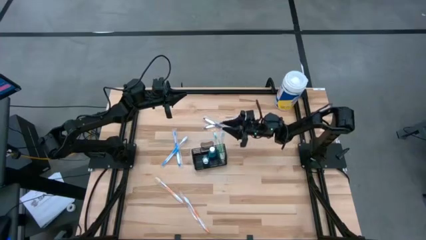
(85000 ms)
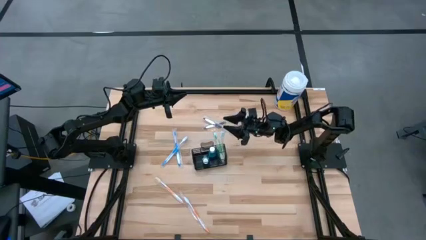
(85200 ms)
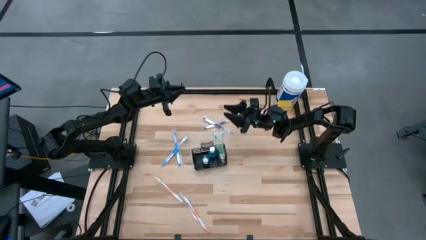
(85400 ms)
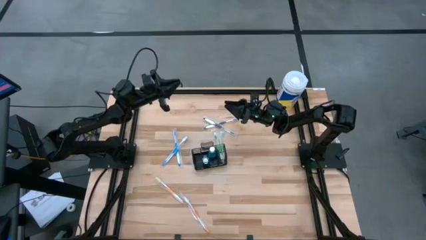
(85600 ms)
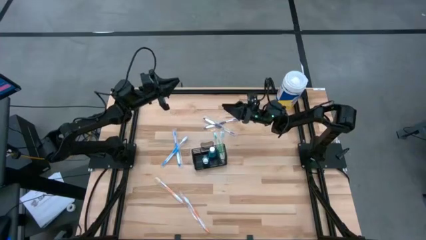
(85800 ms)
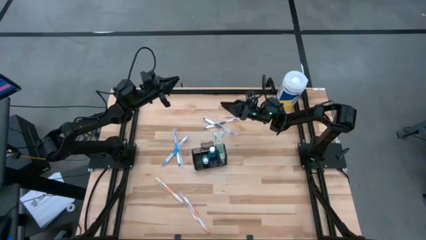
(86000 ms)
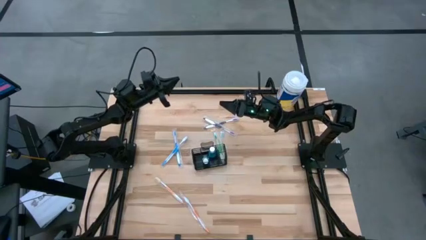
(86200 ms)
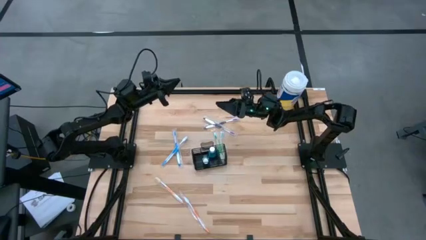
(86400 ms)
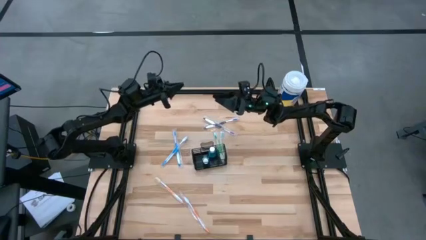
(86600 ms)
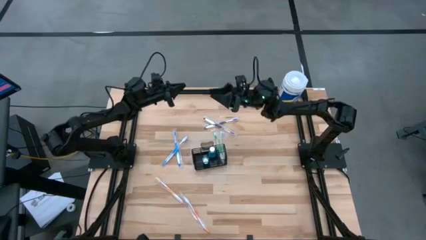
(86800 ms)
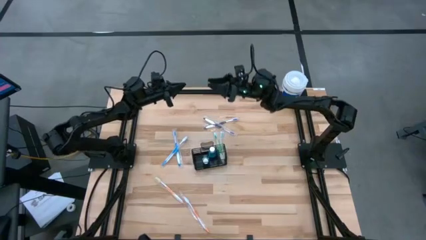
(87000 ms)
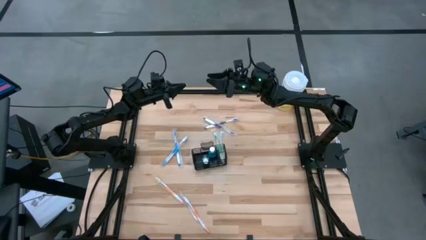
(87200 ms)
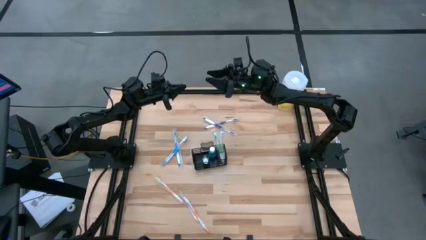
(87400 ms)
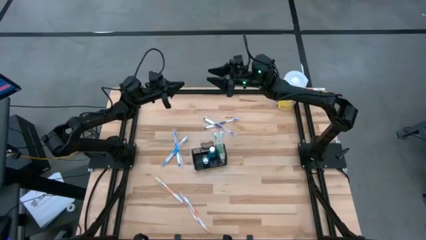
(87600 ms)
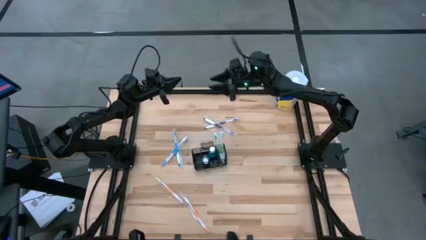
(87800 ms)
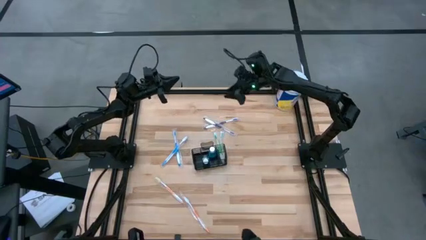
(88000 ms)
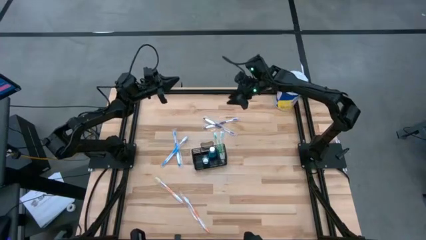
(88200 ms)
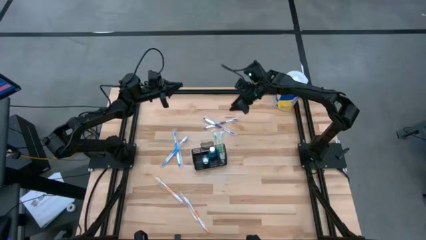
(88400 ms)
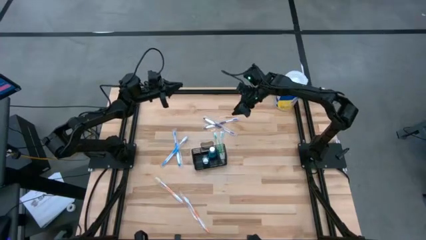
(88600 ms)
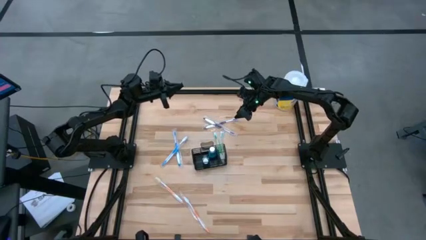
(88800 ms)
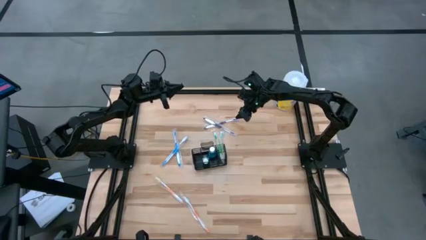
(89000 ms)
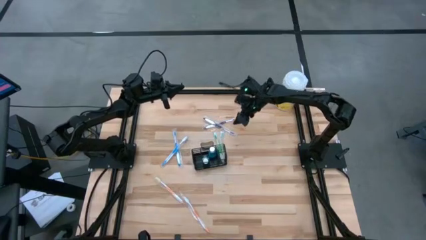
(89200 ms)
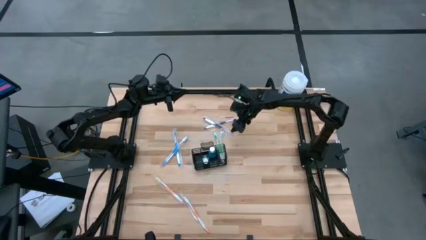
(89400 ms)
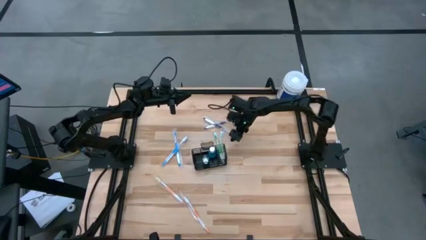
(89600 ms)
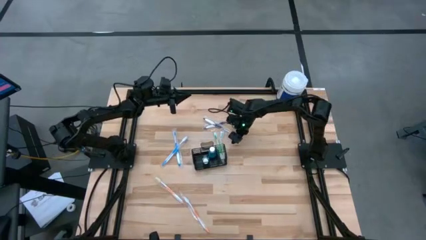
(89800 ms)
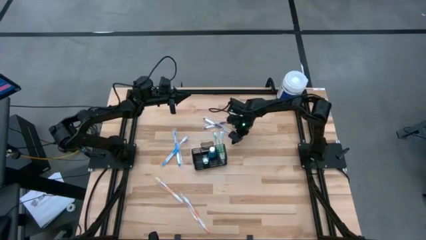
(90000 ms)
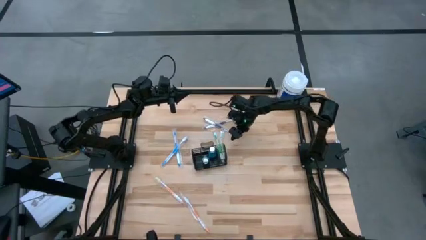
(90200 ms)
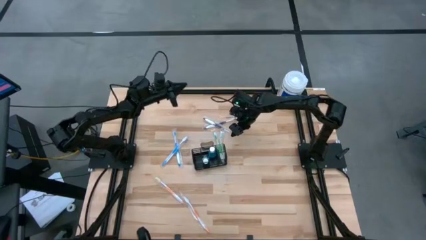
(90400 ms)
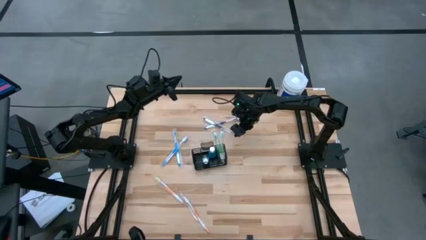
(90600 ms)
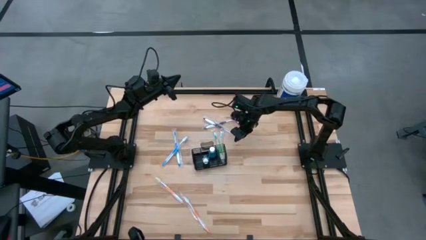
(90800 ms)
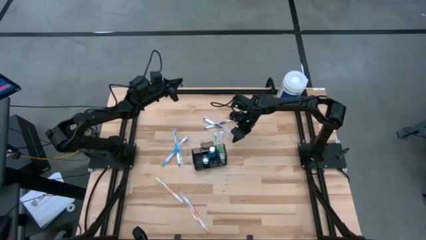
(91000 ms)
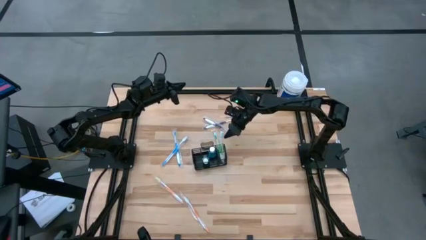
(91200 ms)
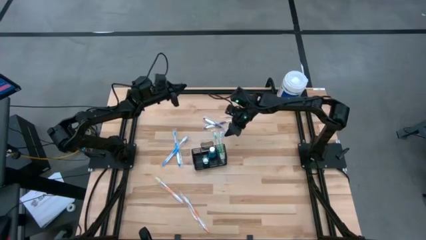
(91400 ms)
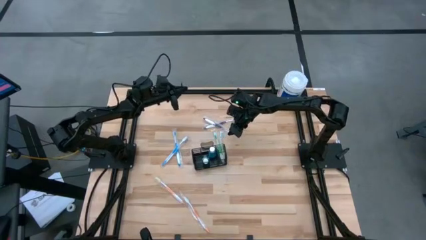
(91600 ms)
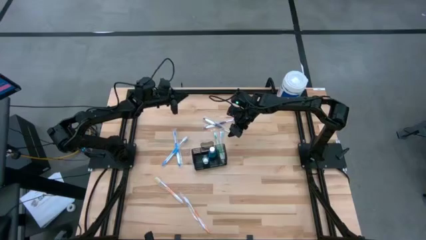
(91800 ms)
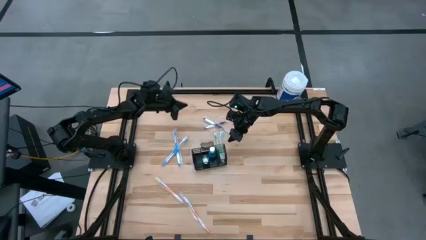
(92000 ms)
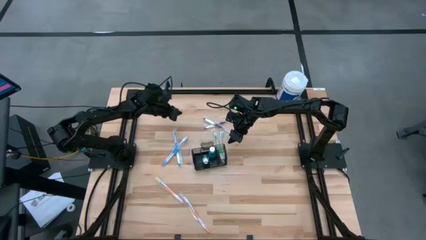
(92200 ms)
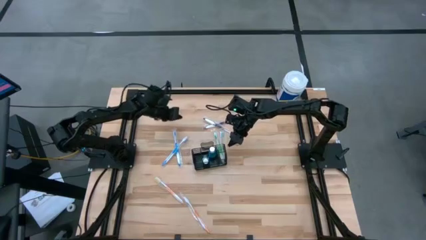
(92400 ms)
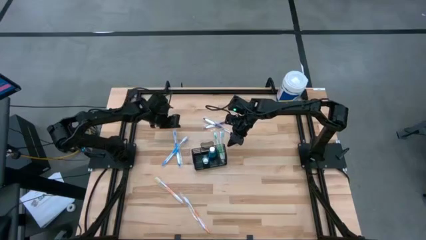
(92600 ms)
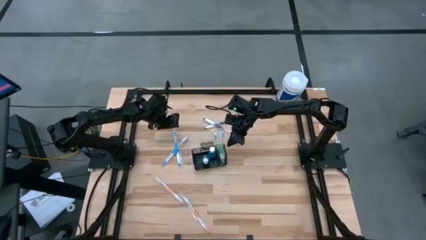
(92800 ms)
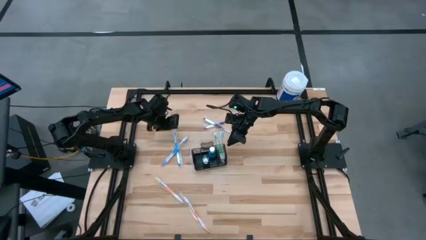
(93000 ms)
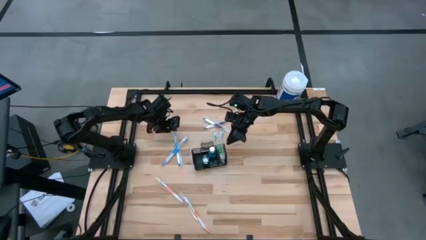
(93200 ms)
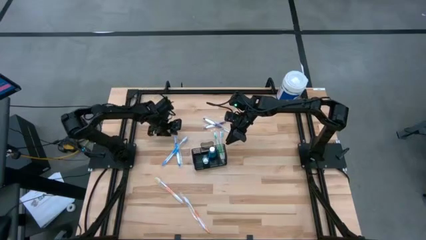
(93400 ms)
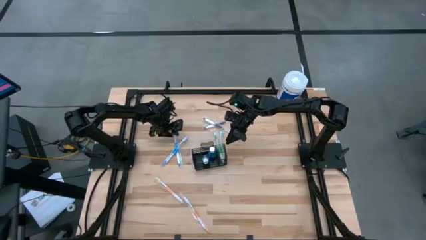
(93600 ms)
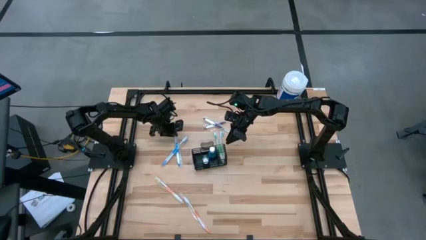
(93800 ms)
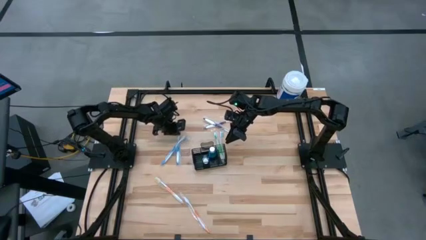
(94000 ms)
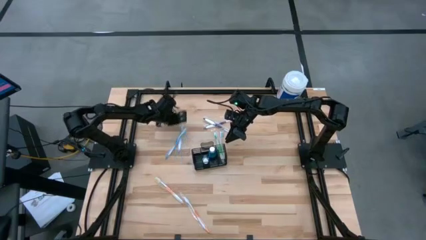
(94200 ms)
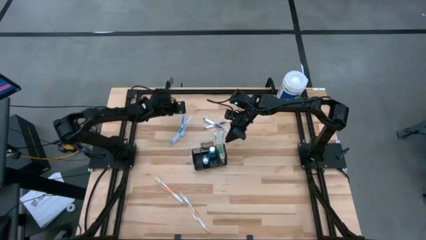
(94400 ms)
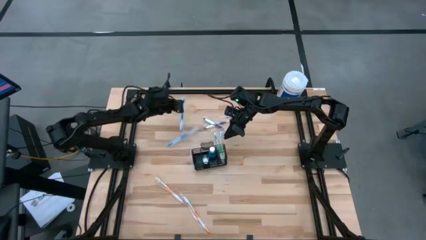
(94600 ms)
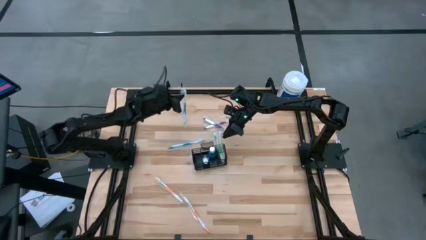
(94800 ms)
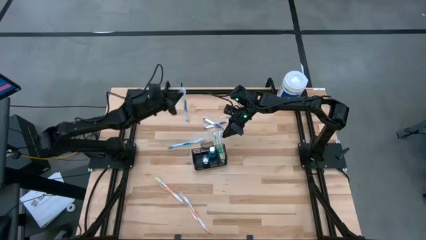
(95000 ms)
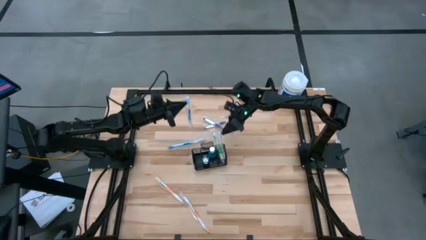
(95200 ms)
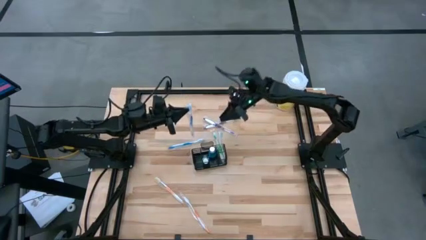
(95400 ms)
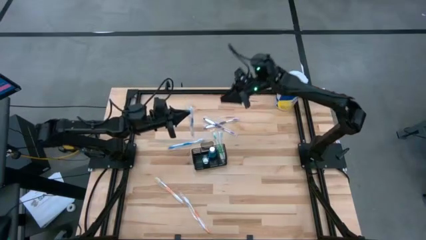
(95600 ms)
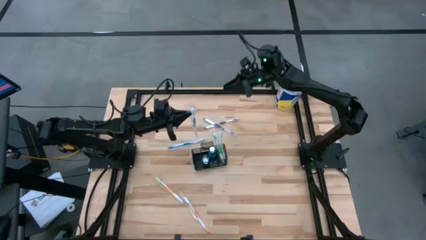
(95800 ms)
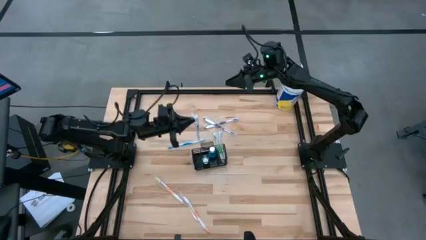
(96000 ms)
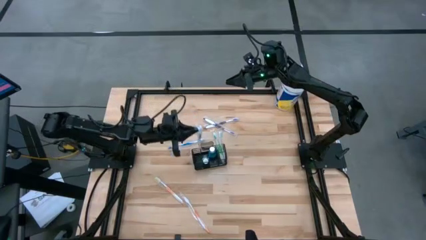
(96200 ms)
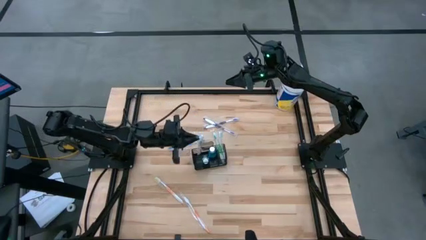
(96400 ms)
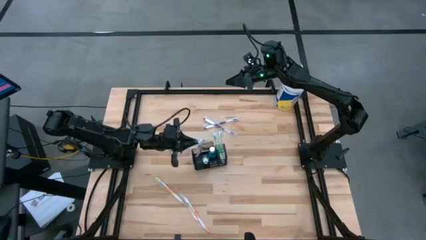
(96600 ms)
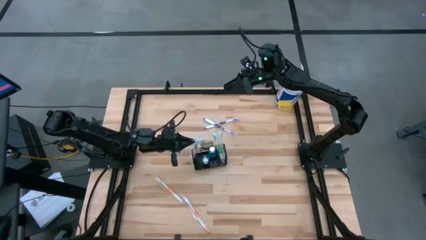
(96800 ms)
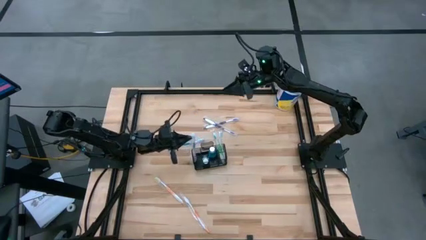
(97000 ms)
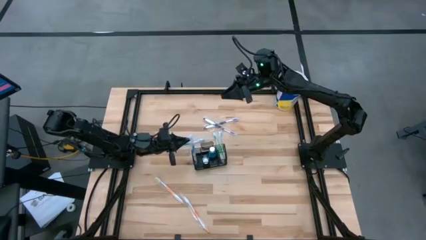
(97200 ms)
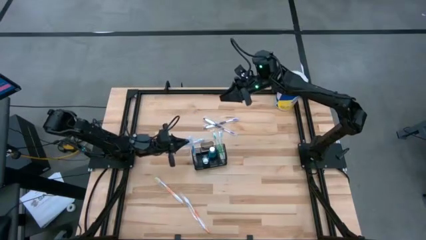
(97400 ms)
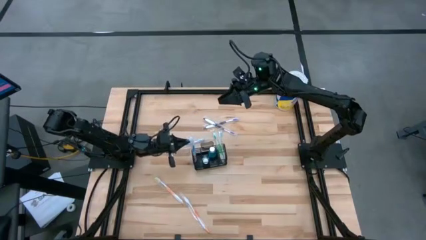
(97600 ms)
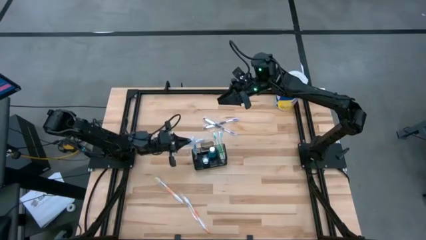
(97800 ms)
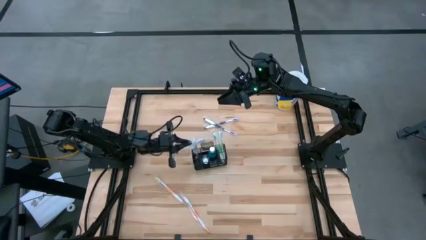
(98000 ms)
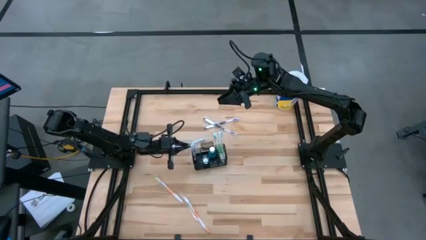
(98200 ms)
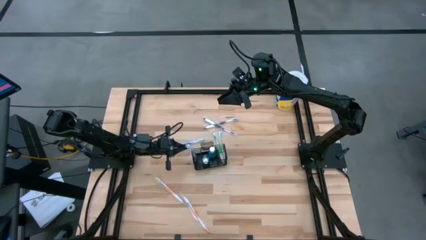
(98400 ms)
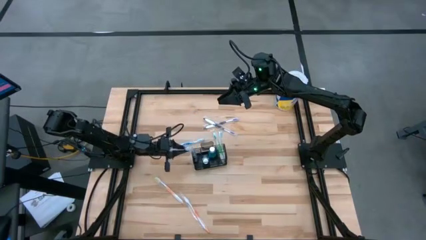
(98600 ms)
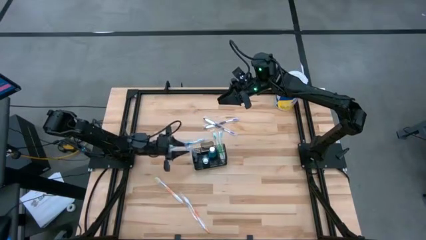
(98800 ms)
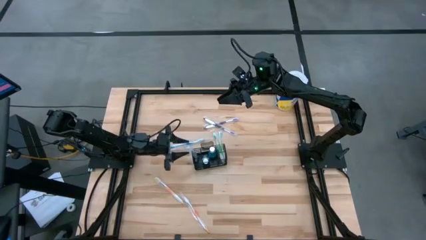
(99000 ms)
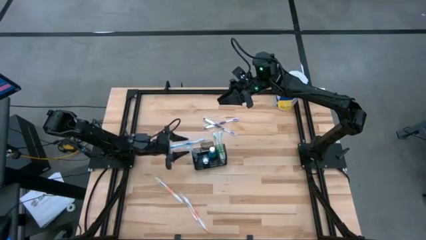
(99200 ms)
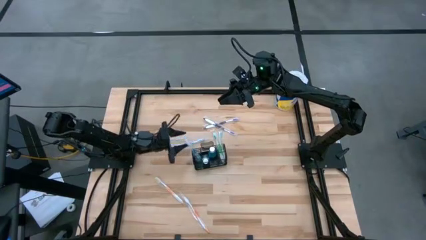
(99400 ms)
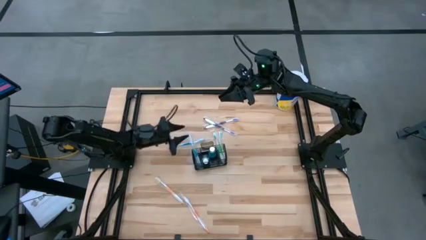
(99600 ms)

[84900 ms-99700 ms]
Task: Pick & Place toothbrushing station
Put the right blue toothbrush into the mesh organizer
